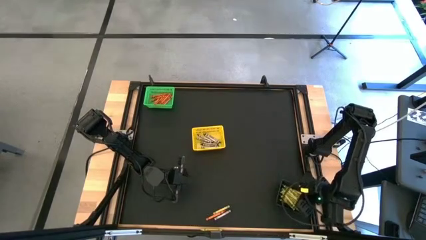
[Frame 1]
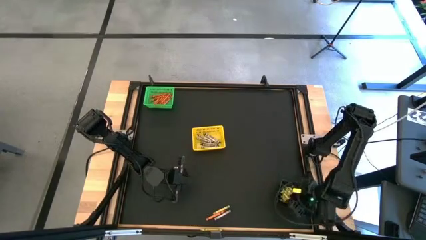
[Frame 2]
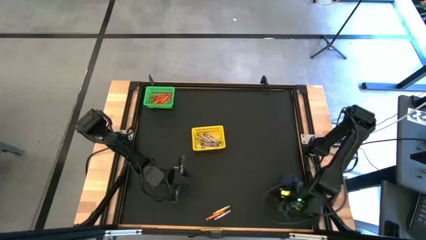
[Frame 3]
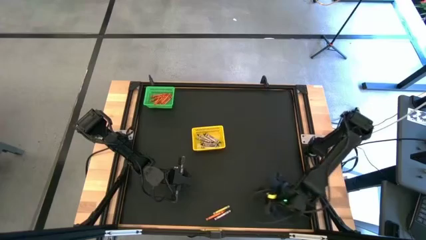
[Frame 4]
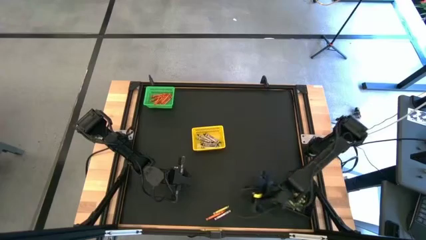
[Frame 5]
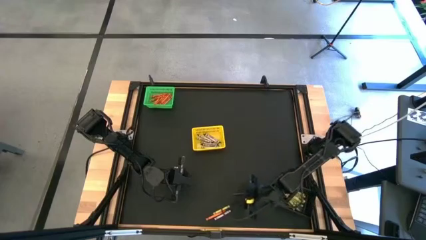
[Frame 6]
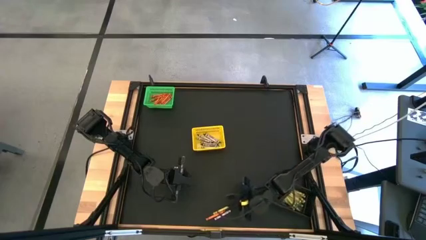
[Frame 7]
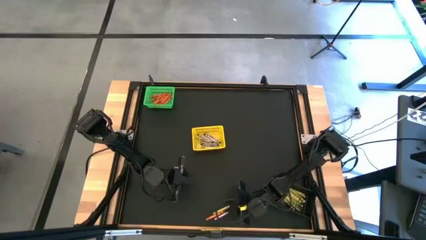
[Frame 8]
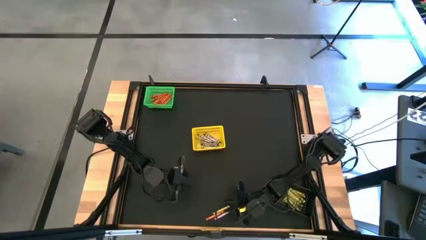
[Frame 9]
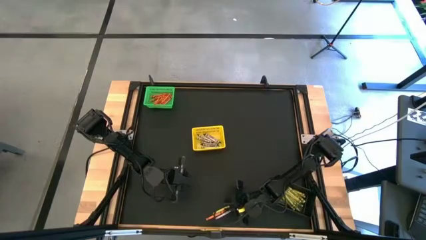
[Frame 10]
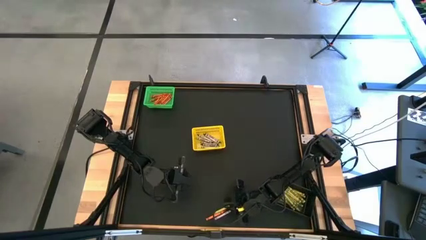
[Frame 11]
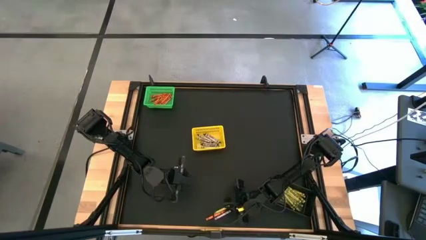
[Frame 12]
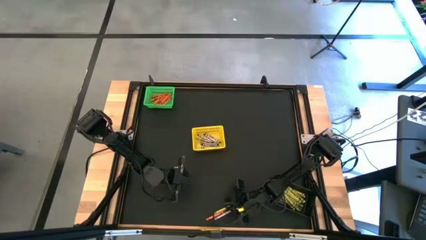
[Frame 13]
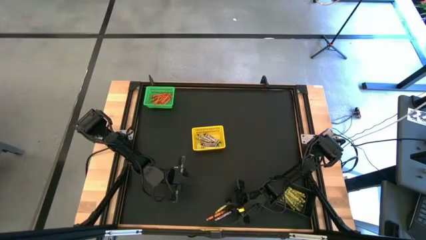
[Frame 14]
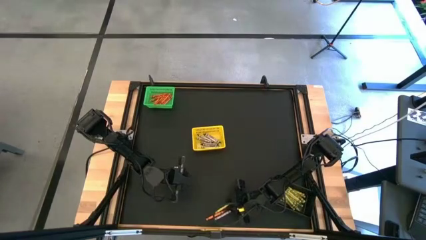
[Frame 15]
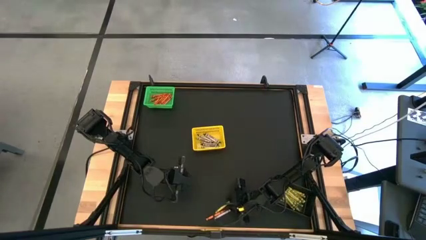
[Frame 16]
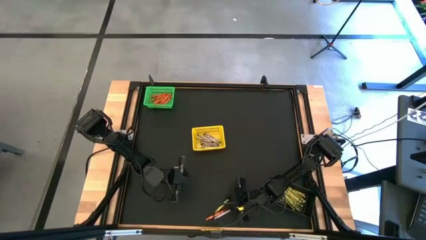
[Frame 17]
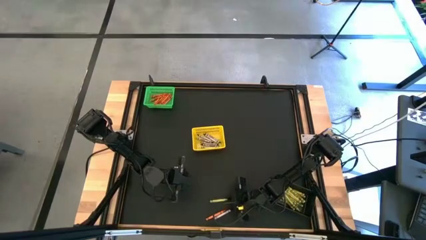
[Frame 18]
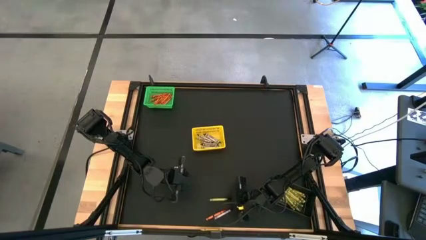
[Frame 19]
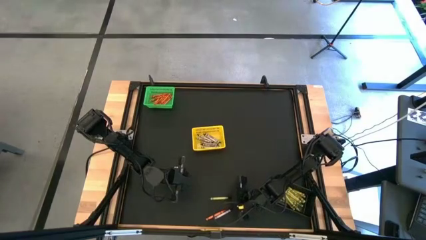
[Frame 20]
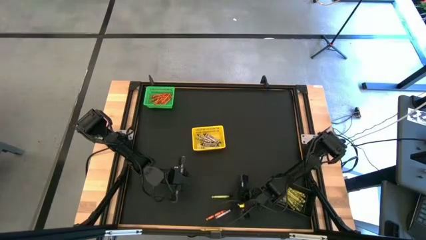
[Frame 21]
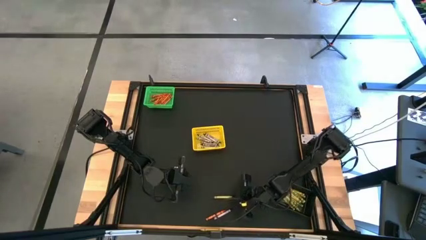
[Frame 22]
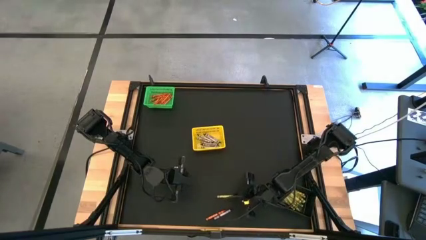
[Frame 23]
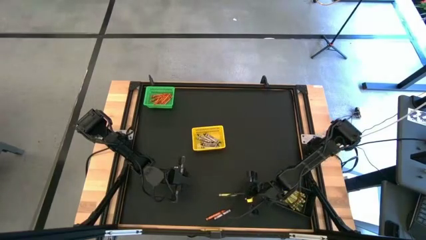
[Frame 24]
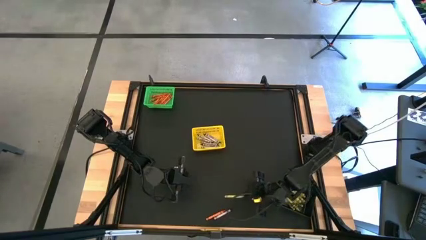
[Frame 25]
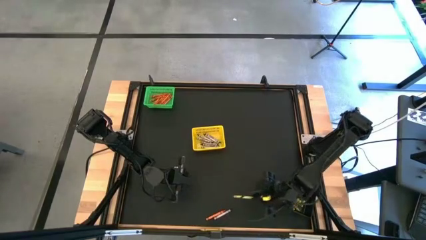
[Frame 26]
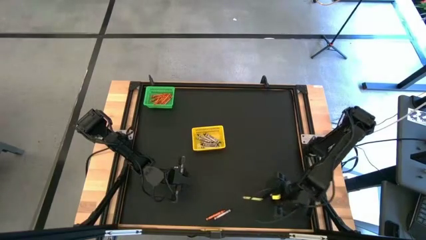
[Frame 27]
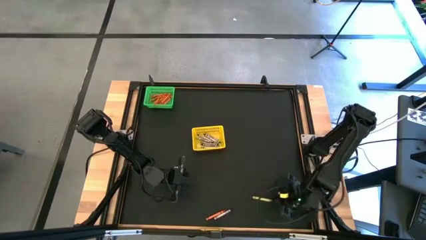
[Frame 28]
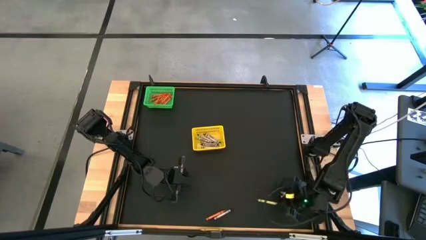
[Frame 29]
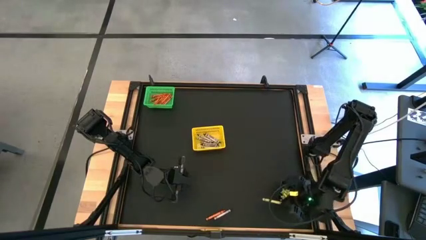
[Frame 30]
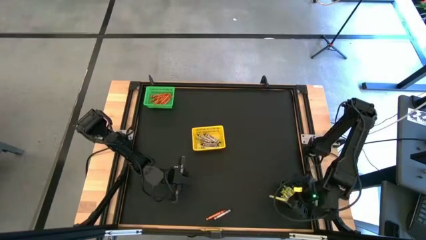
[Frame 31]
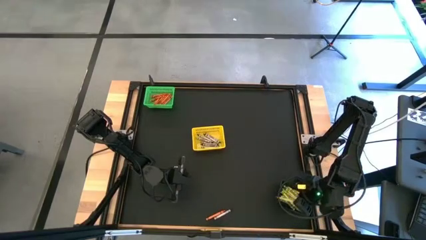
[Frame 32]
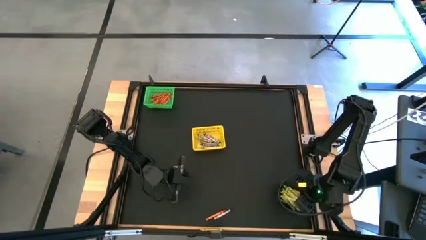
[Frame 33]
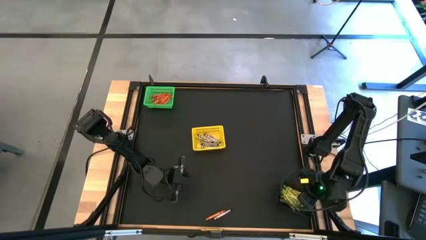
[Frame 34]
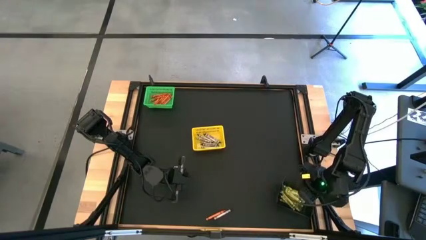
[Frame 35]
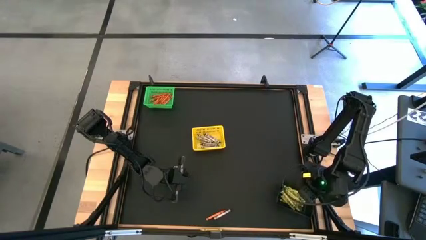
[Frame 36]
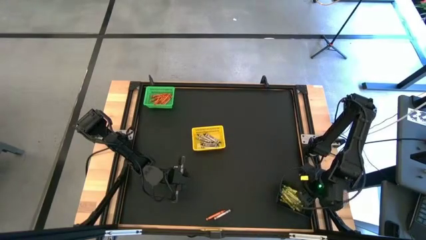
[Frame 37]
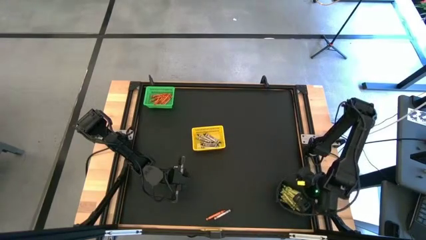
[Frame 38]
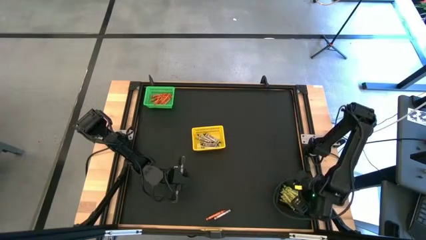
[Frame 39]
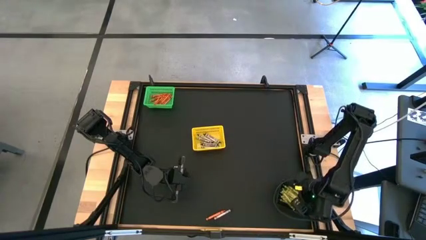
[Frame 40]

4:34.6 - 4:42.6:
Task: Sort crayons
Put the green crayon into the black bin

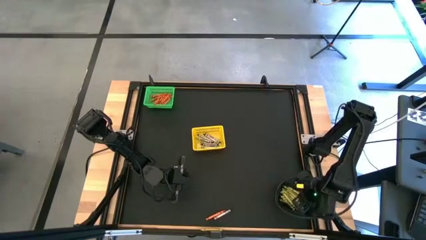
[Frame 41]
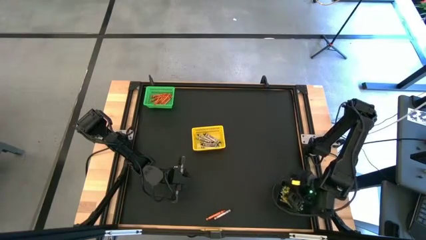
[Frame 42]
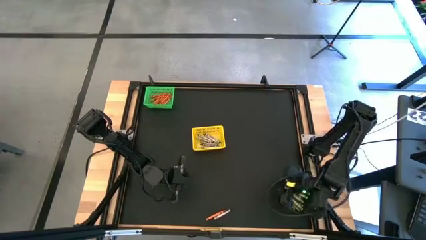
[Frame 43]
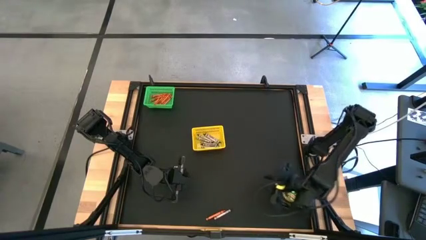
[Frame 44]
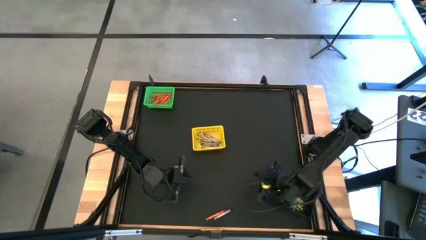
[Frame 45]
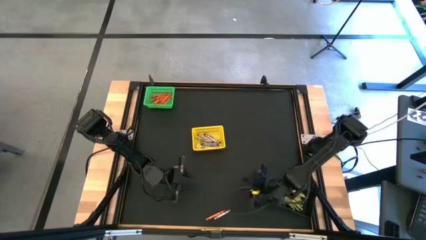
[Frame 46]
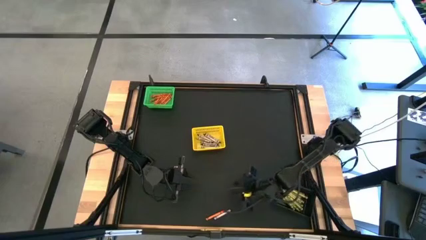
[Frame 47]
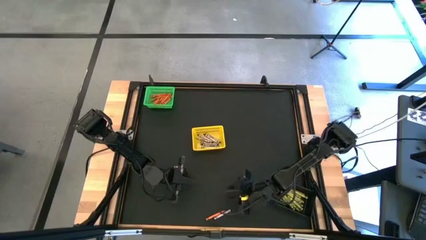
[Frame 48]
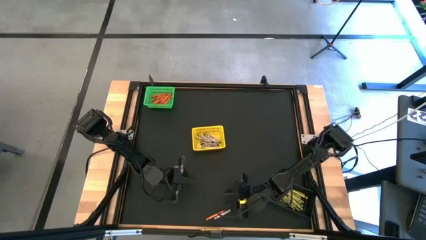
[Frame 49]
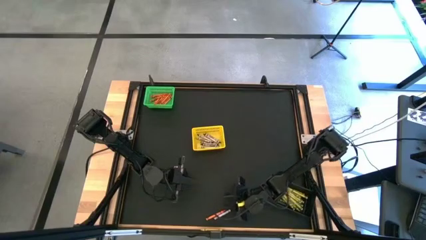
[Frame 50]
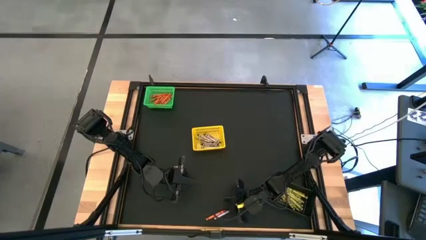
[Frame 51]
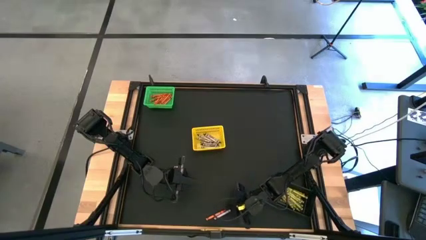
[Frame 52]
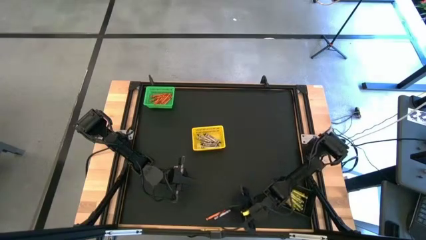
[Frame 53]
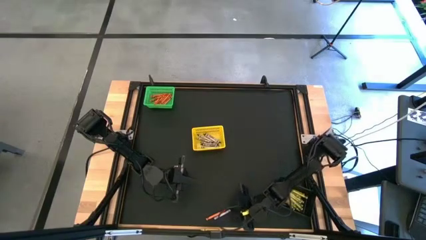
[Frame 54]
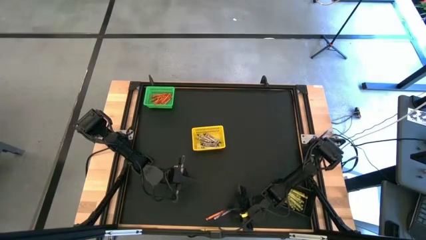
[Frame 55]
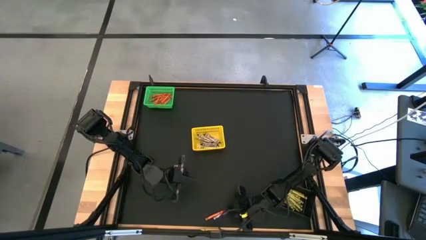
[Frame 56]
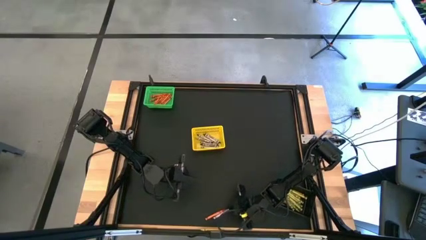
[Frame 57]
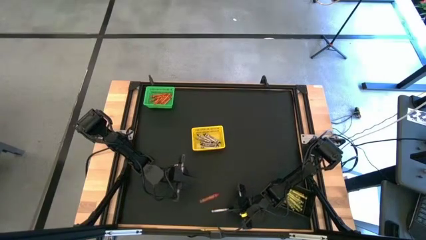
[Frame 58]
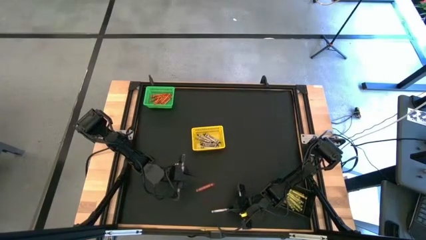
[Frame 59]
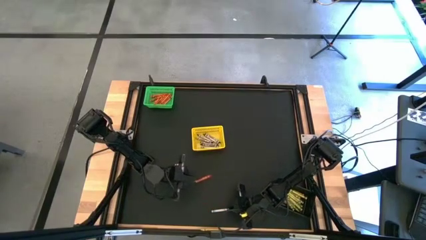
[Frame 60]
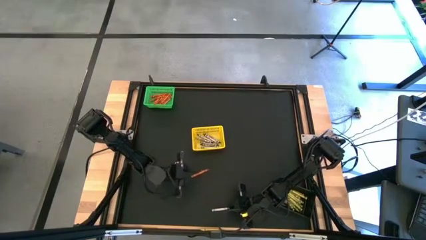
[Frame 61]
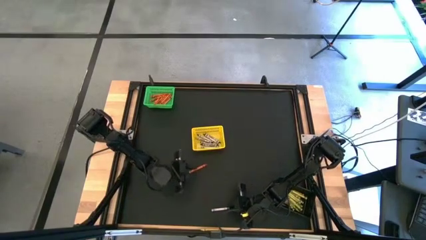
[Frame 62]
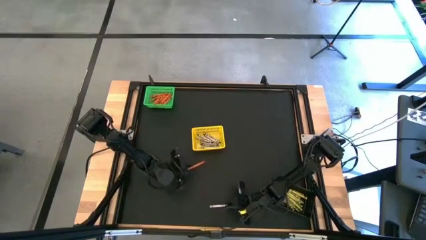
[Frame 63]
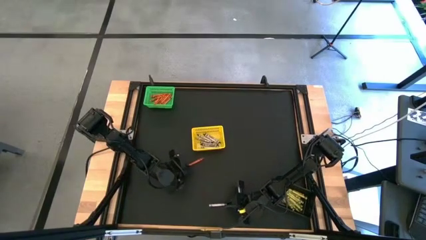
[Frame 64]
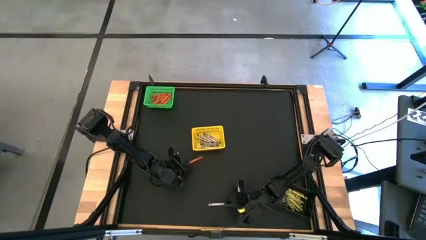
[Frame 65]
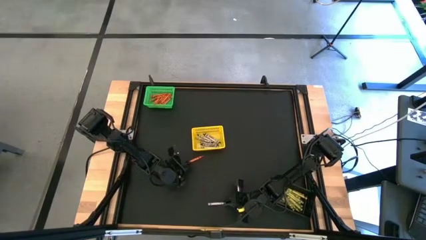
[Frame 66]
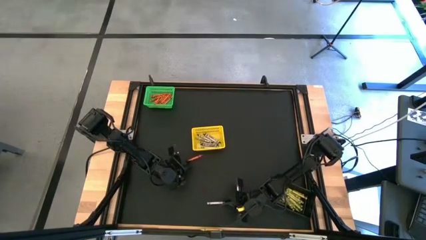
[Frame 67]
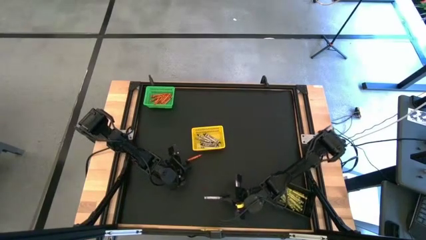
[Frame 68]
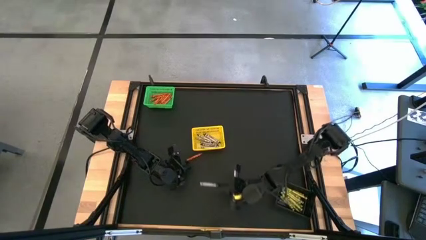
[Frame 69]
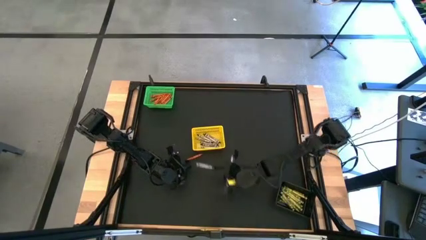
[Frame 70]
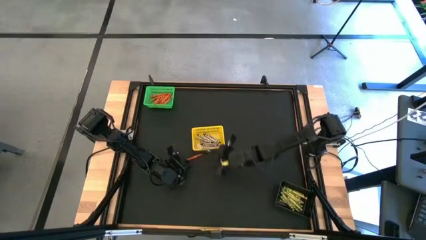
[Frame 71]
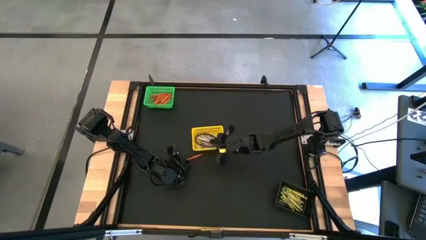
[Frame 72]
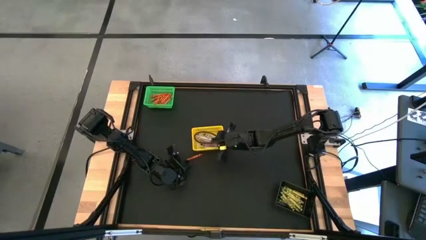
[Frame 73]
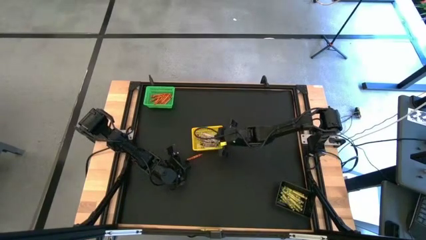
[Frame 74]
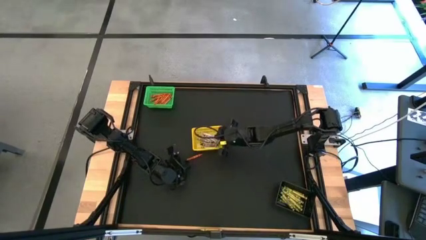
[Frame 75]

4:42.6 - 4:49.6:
Put the black crayon into the yellow bin
